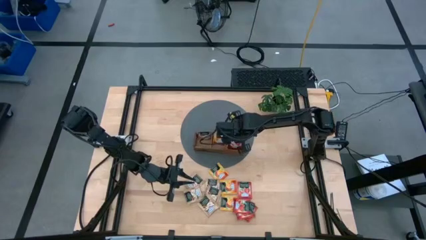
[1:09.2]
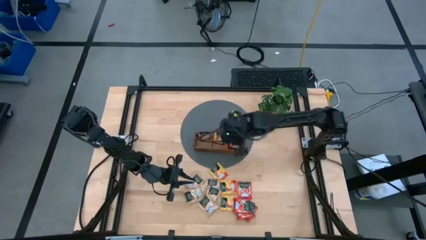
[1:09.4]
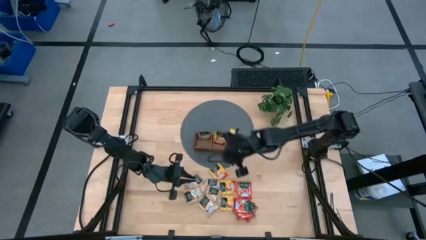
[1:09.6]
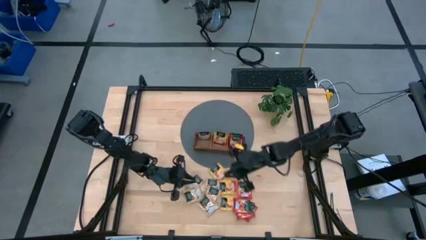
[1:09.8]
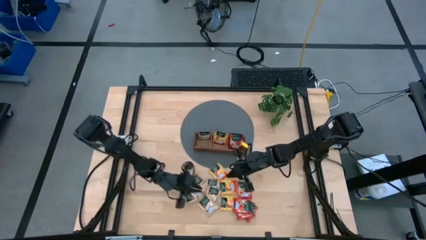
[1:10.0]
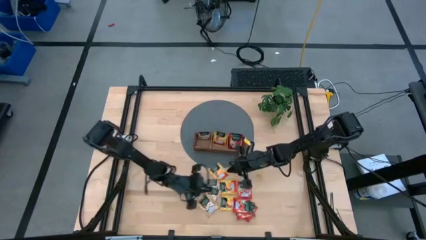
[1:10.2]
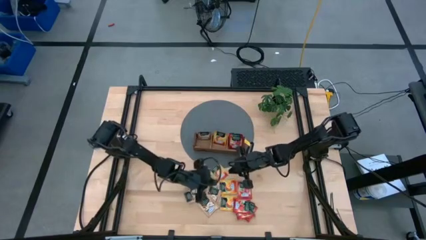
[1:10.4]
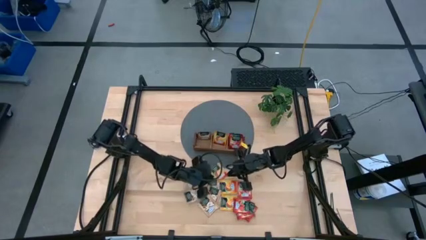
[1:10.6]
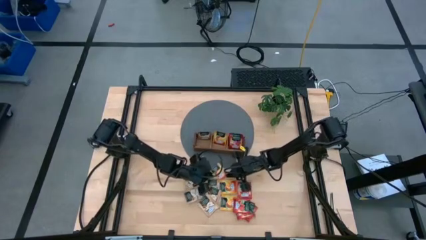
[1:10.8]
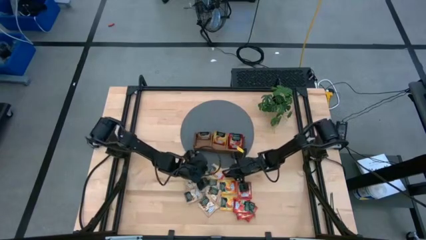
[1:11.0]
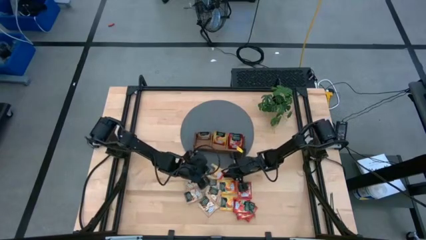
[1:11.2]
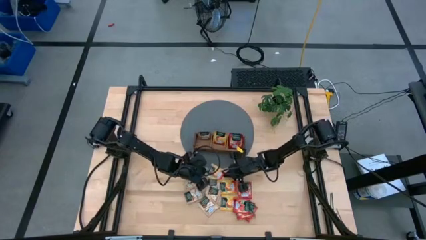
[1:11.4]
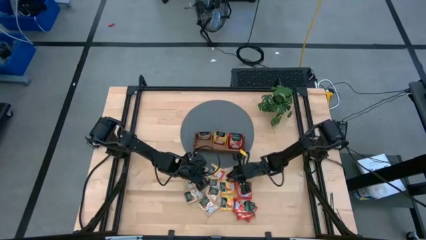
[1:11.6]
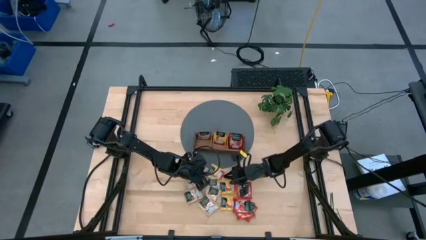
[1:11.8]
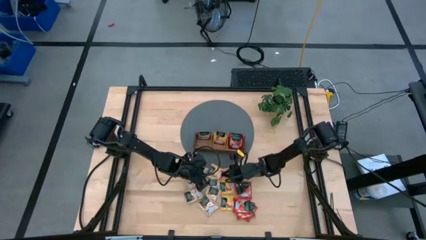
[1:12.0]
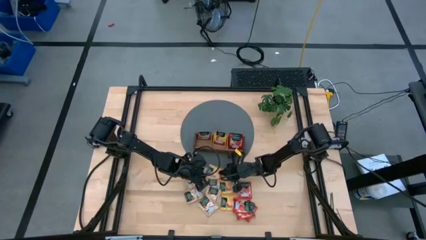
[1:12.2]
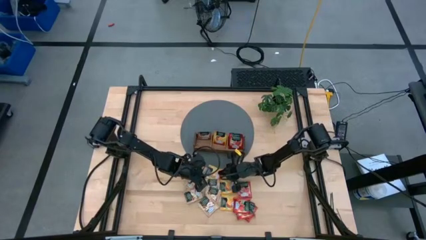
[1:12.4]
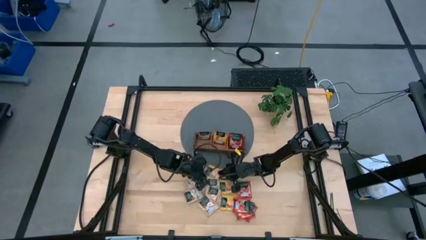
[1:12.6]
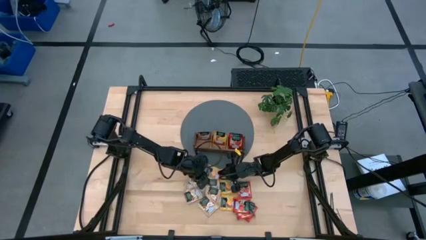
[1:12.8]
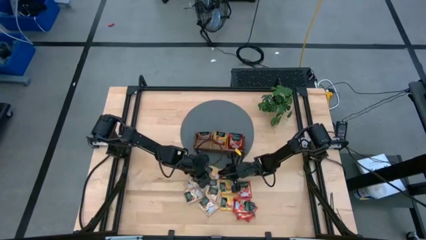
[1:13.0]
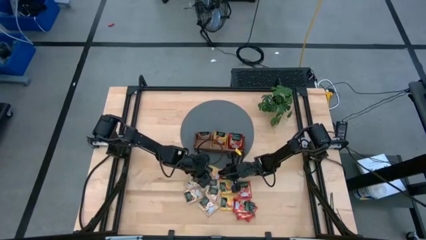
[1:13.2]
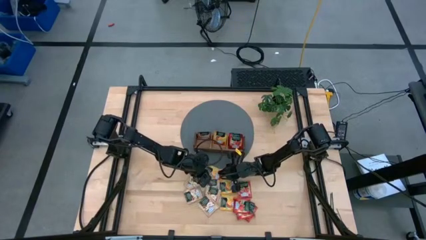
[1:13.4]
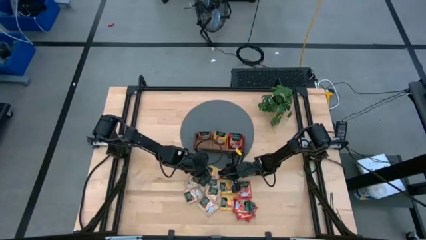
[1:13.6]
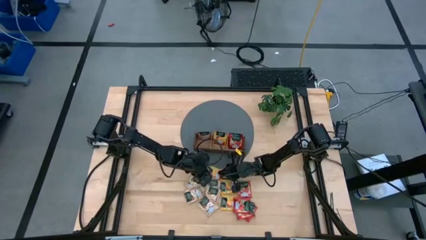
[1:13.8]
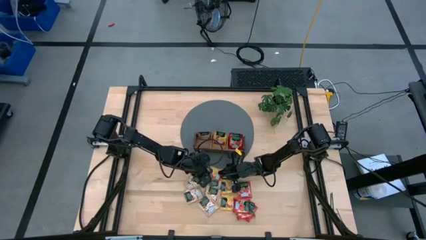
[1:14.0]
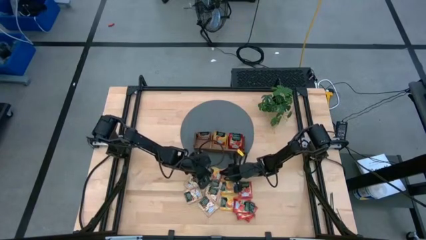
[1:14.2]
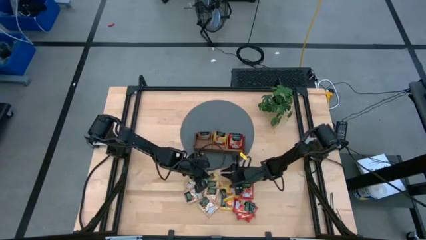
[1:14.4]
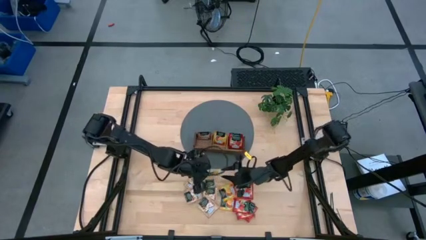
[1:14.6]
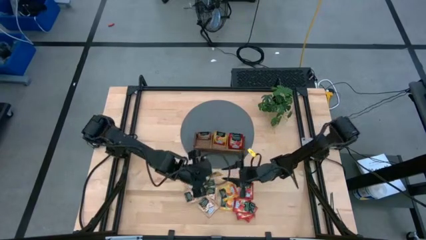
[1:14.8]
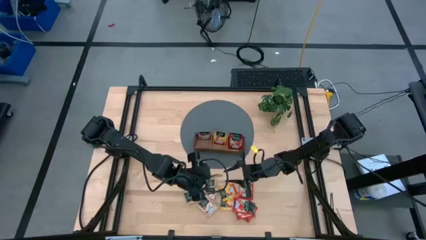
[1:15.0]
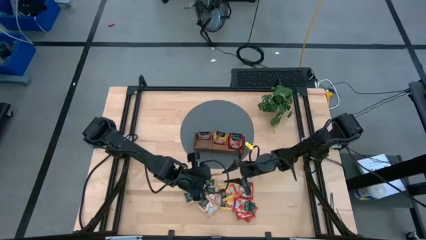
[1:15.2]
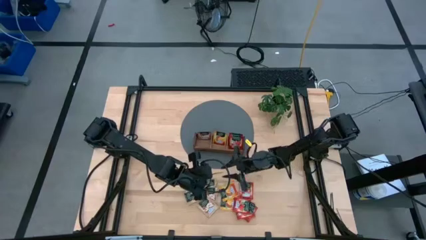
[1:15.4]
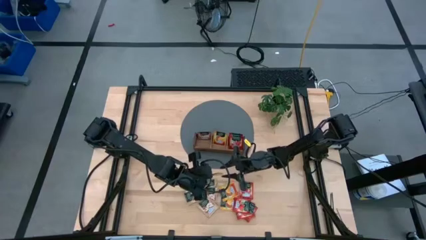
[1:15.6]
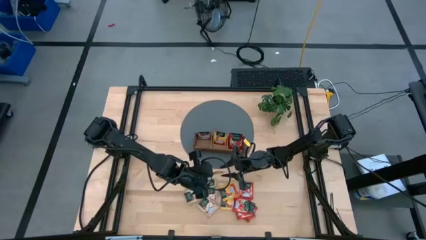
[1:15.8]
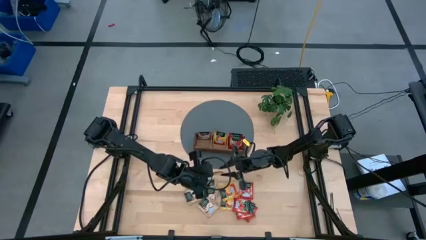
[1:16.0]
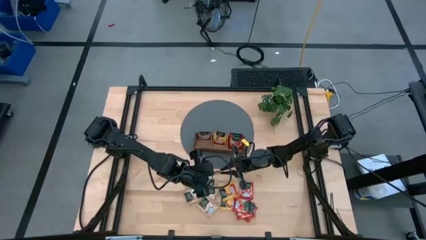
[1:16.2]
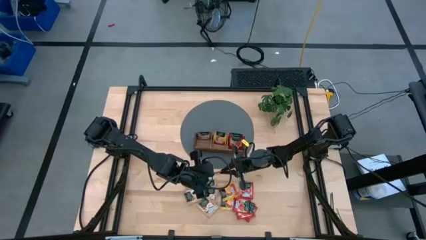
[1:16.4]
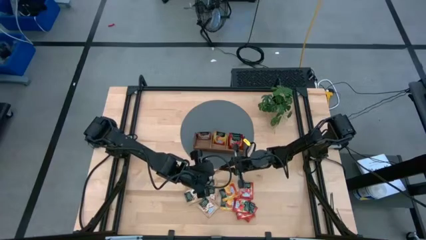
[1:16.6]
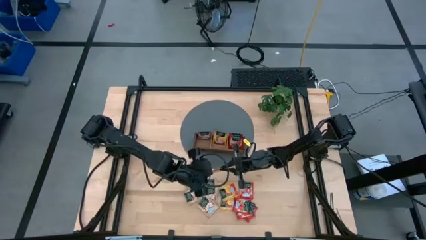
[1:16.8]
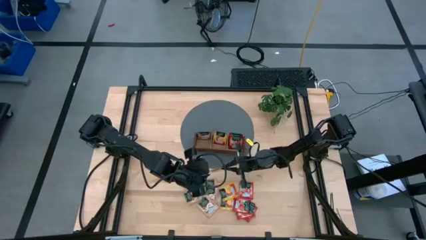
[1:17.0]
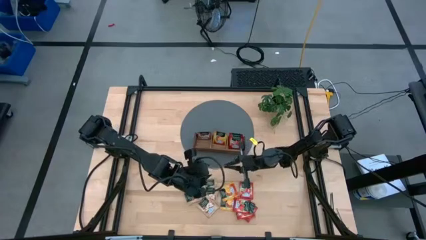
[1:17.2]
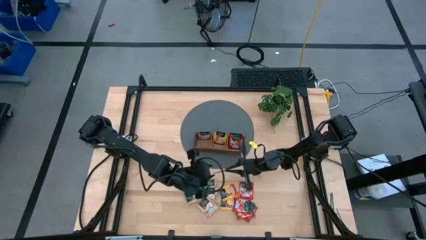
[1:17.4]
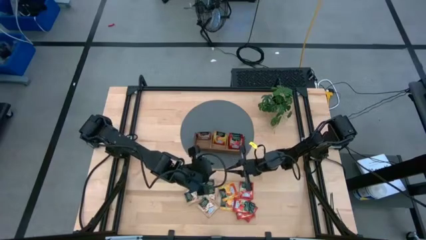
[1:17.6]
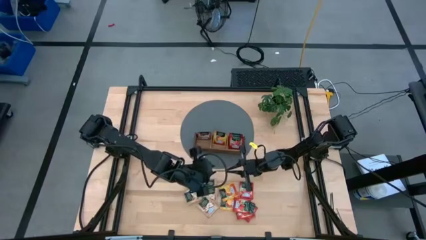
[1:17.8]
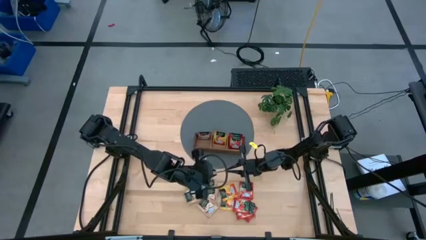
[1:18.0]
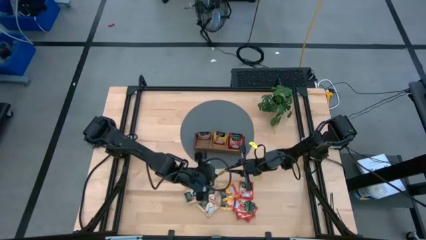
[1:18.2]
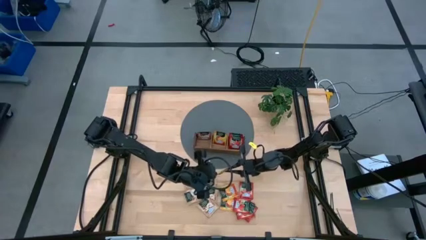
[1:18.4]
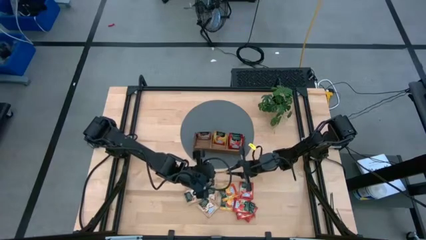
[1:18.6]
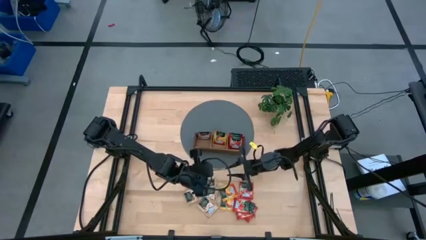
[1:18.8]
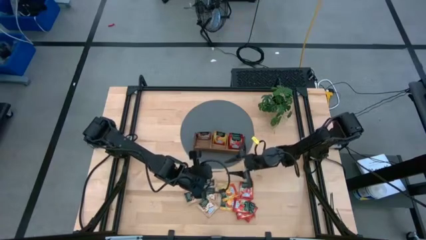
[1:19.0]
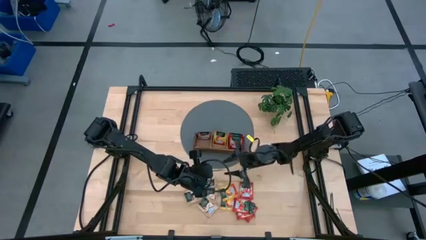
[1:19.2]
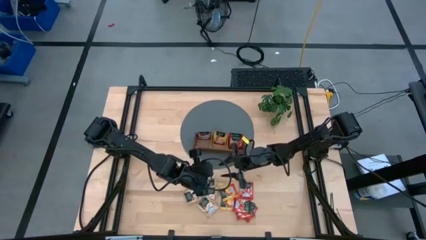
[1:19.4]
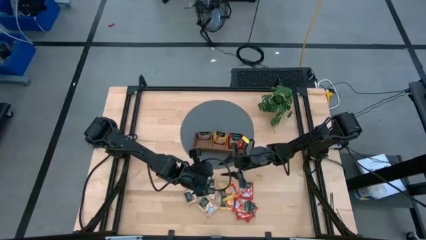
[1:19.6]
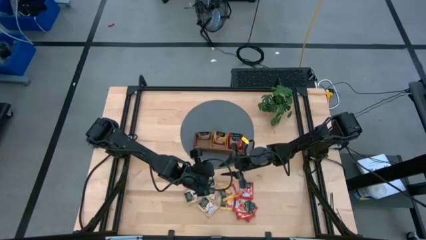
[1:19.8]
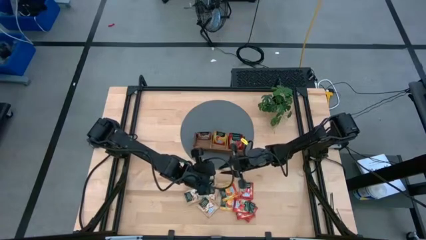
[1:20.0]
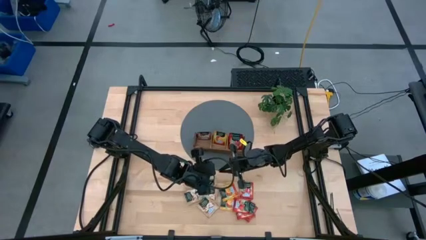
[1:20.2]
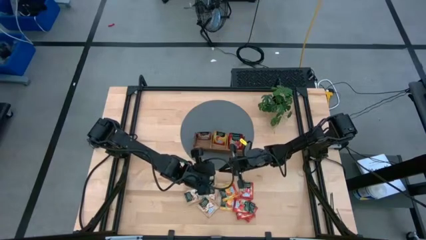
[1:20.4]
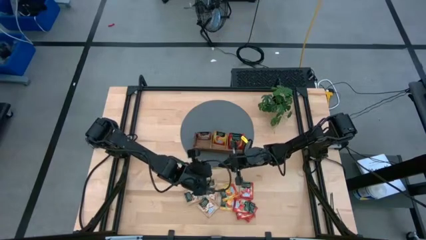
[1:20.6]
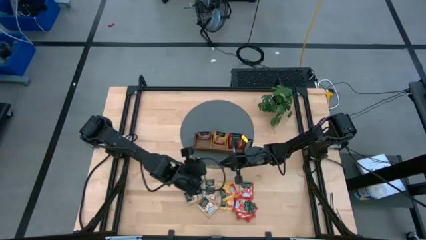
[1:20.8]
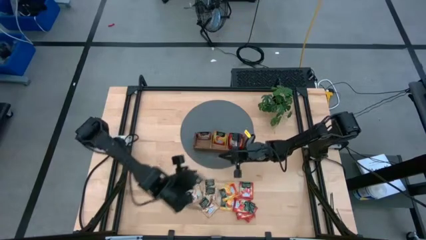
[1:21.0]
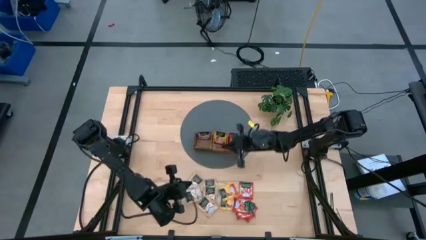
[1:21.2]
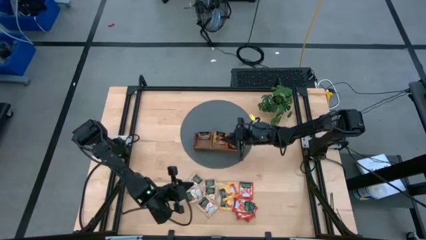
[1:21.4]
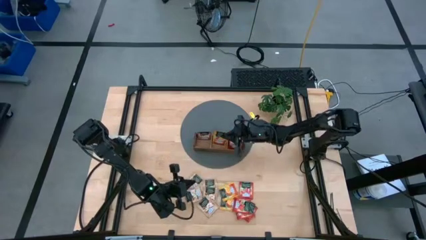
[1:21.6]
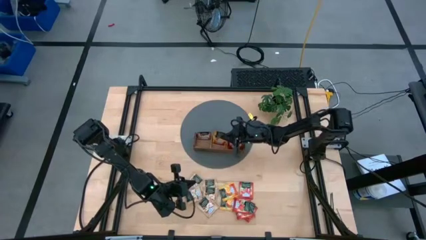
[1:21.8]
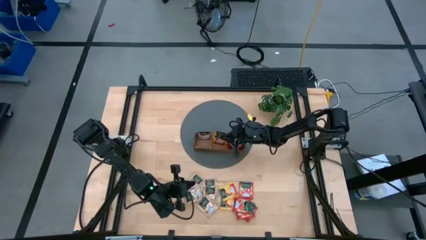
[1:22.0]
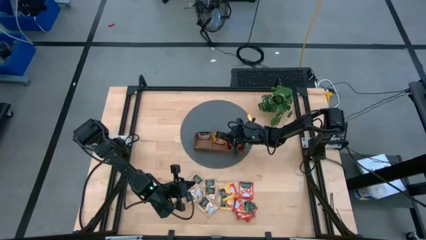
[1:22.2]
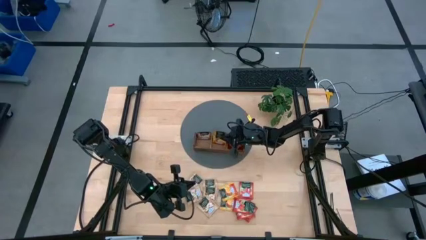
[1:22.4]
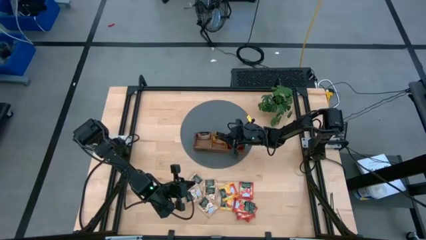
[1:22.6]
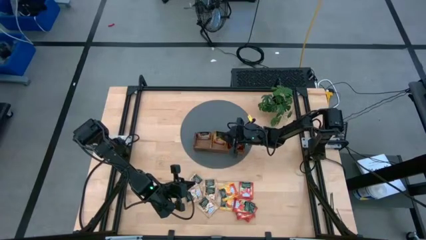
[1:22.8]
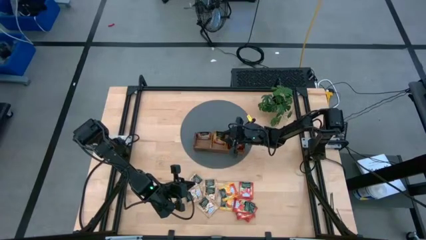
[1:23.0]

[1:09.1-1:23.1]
Task: Pick & Place Tea
Put the yellow tea bag into the middle section of the wooden organizer
